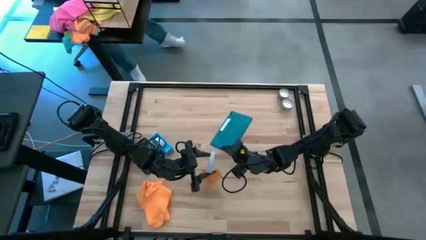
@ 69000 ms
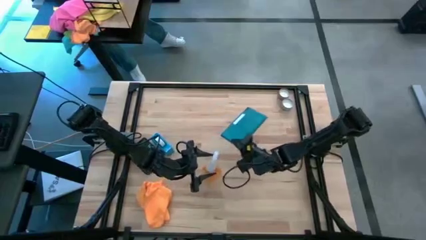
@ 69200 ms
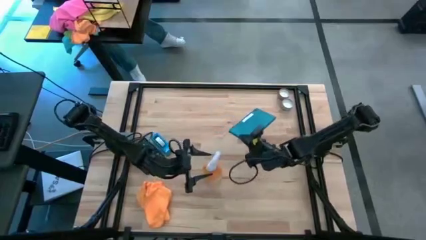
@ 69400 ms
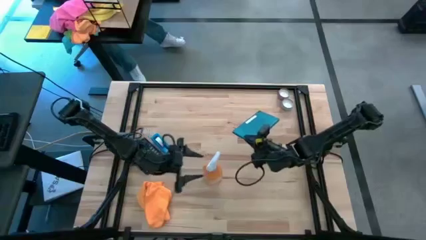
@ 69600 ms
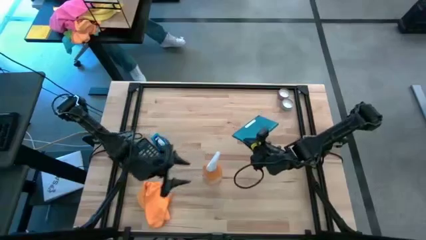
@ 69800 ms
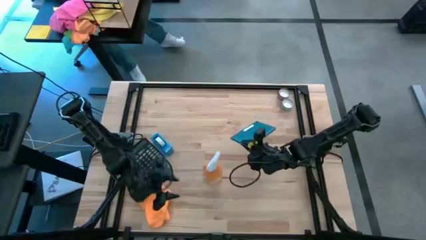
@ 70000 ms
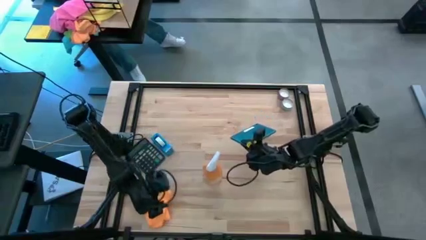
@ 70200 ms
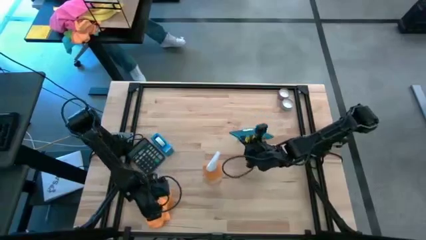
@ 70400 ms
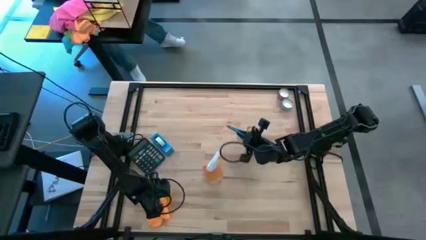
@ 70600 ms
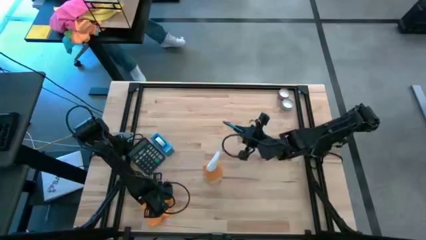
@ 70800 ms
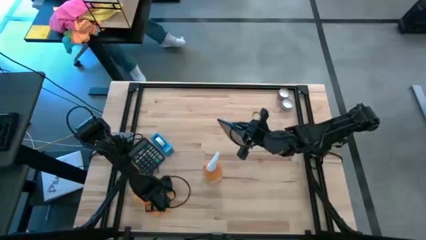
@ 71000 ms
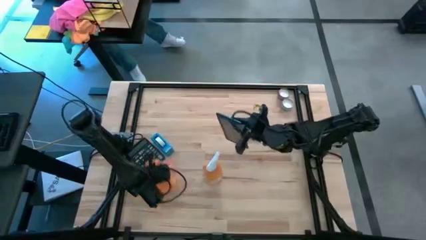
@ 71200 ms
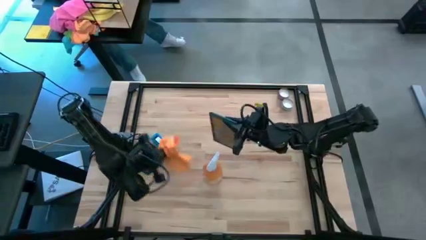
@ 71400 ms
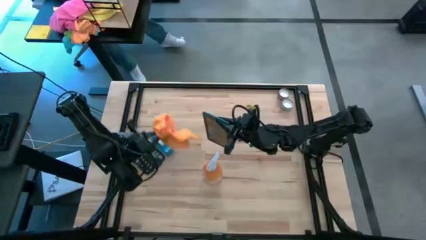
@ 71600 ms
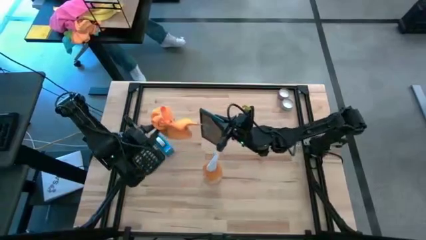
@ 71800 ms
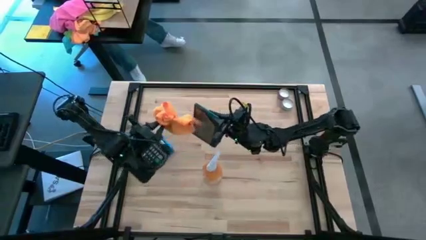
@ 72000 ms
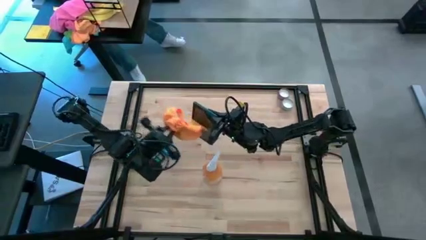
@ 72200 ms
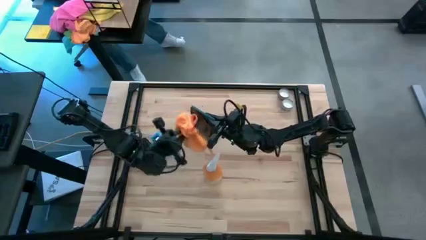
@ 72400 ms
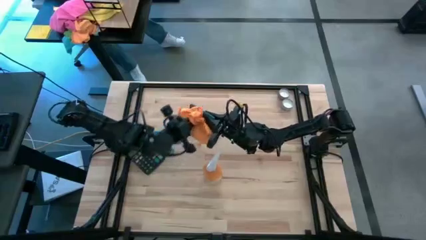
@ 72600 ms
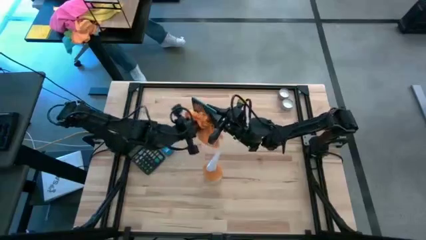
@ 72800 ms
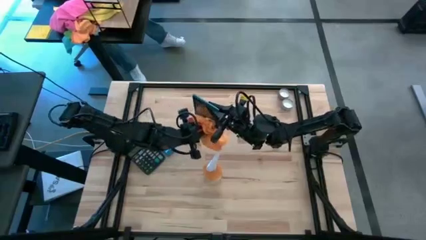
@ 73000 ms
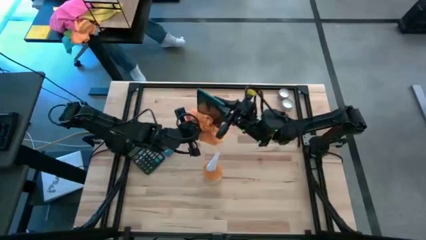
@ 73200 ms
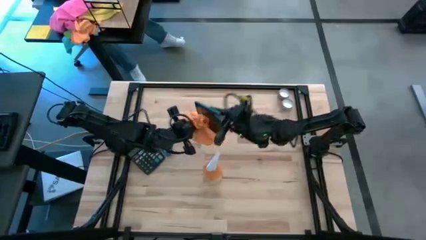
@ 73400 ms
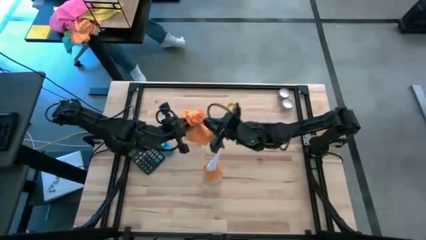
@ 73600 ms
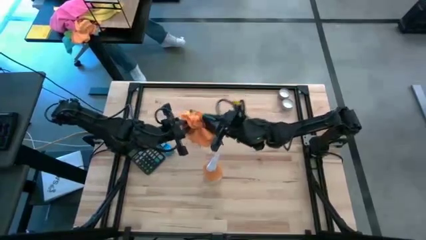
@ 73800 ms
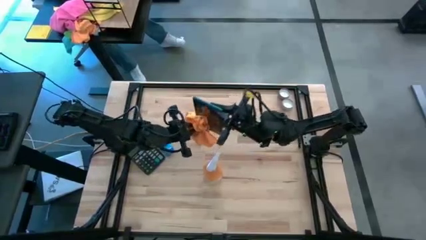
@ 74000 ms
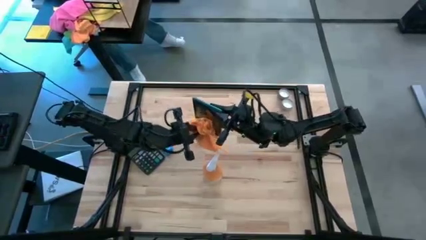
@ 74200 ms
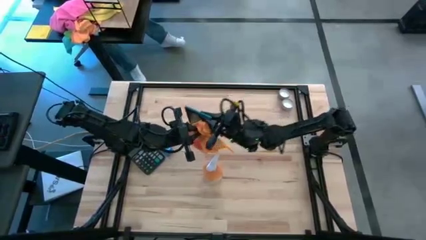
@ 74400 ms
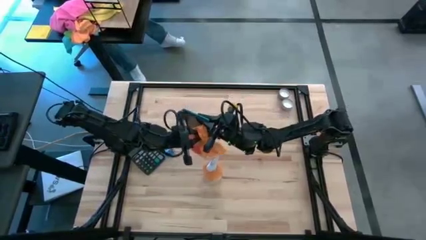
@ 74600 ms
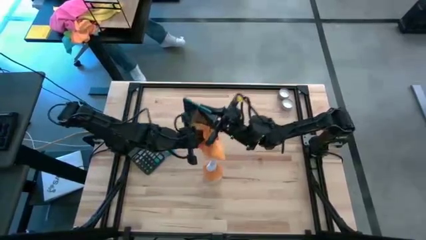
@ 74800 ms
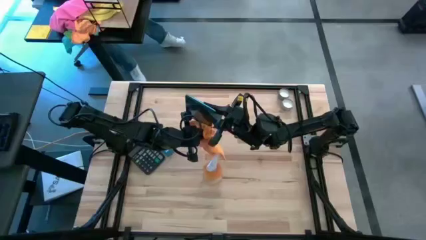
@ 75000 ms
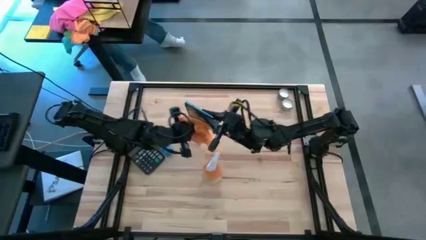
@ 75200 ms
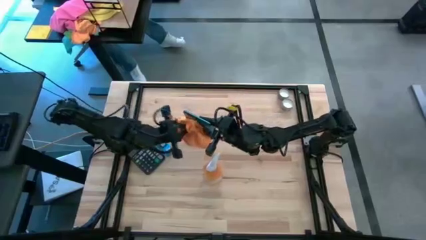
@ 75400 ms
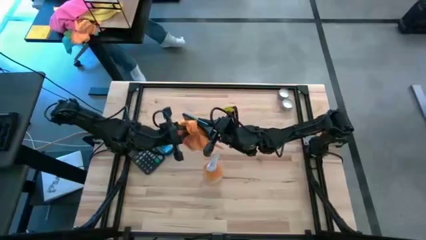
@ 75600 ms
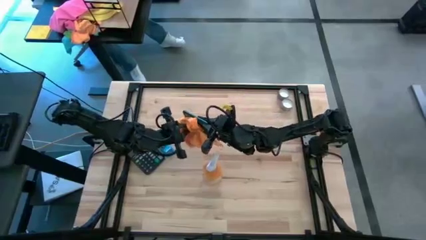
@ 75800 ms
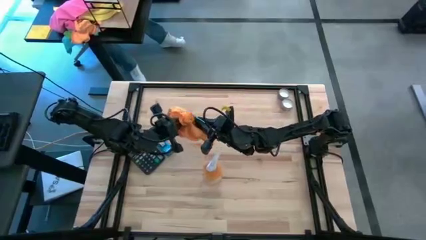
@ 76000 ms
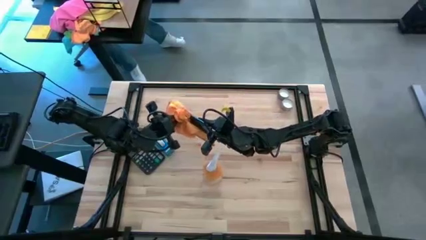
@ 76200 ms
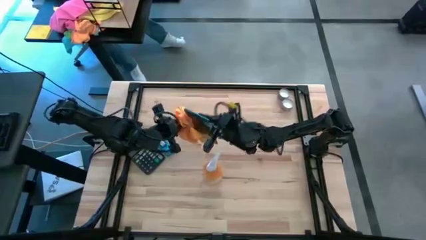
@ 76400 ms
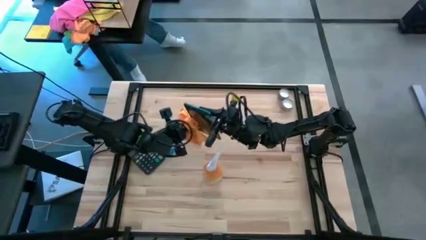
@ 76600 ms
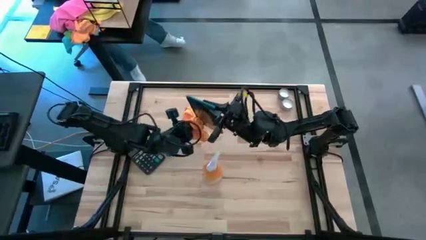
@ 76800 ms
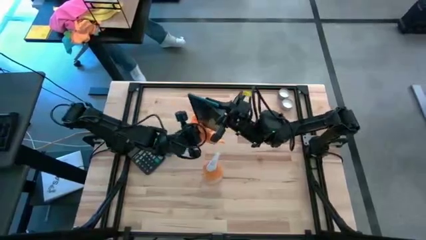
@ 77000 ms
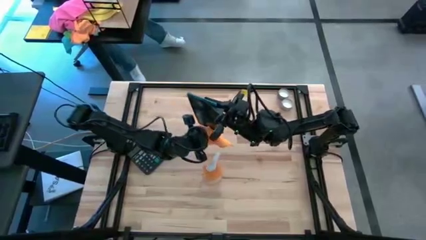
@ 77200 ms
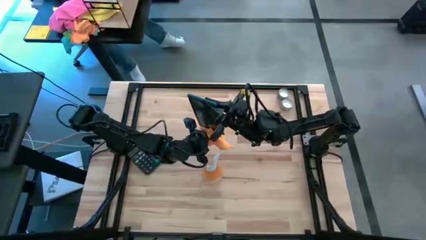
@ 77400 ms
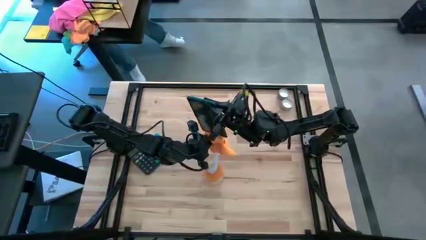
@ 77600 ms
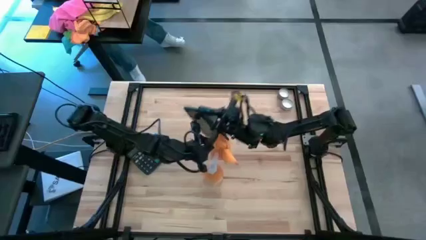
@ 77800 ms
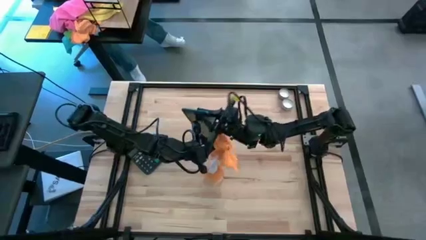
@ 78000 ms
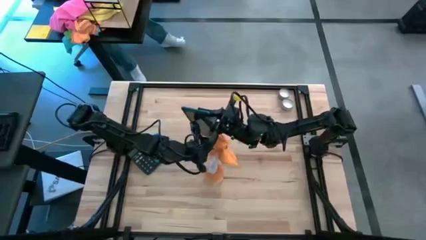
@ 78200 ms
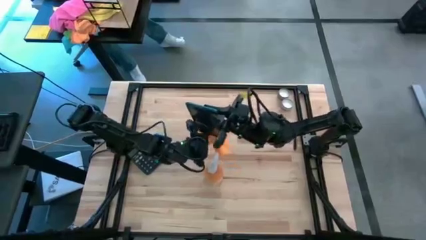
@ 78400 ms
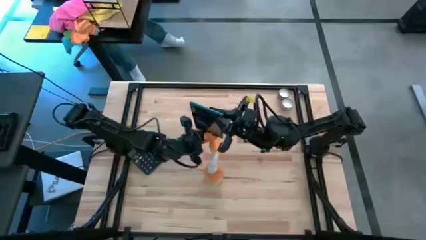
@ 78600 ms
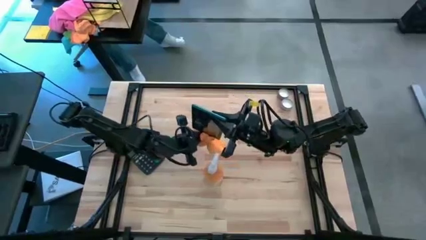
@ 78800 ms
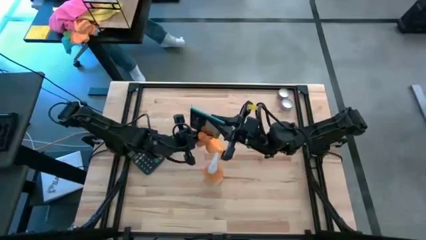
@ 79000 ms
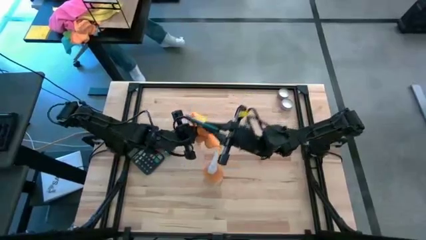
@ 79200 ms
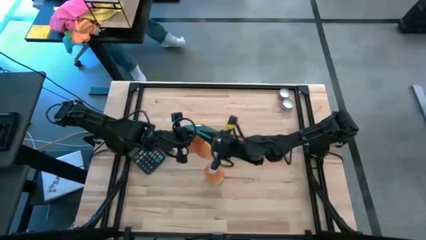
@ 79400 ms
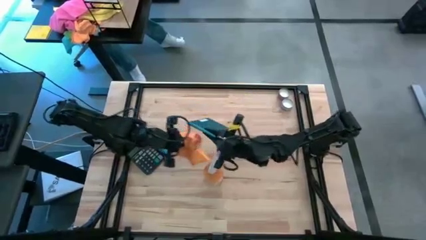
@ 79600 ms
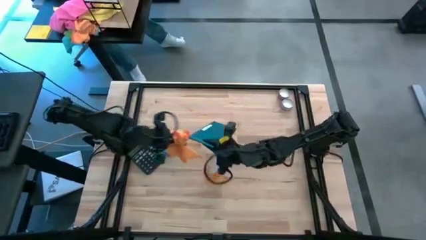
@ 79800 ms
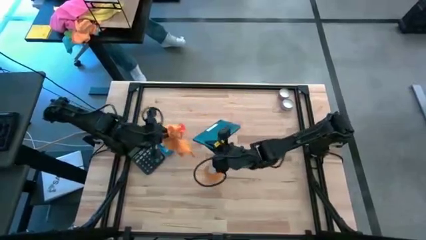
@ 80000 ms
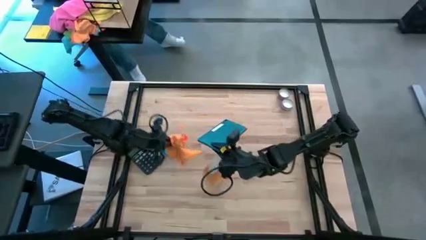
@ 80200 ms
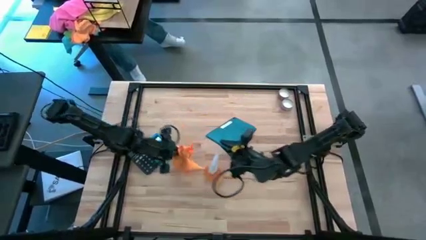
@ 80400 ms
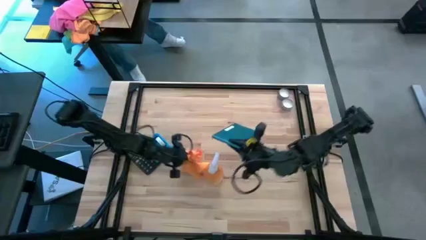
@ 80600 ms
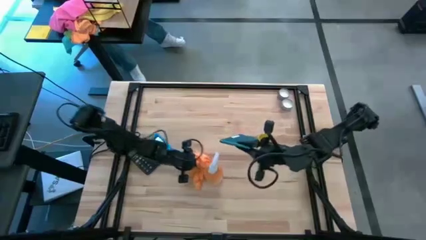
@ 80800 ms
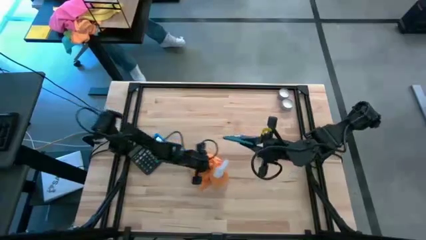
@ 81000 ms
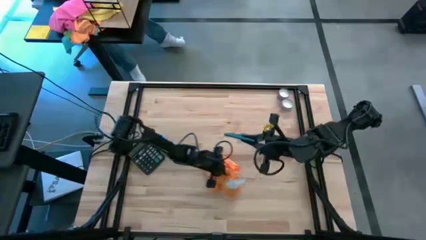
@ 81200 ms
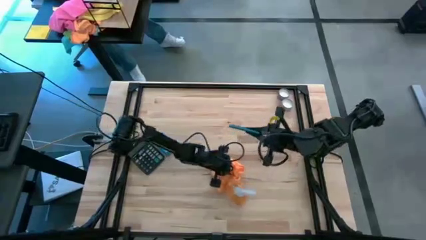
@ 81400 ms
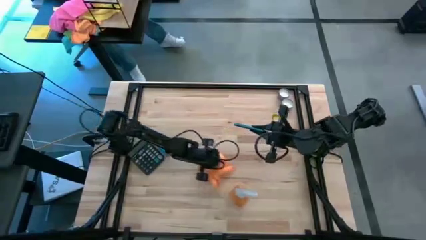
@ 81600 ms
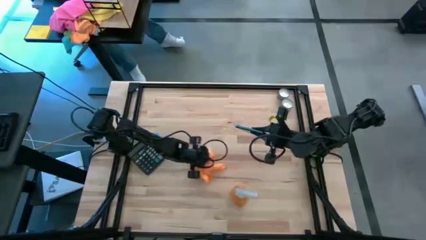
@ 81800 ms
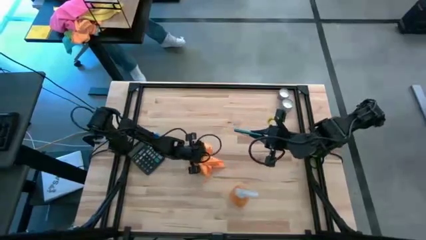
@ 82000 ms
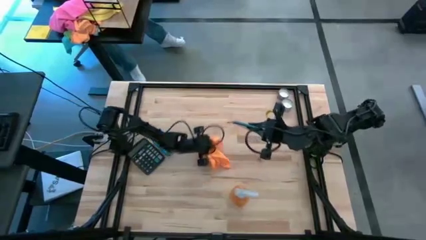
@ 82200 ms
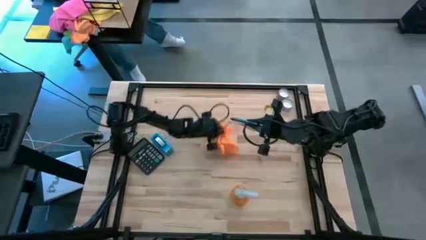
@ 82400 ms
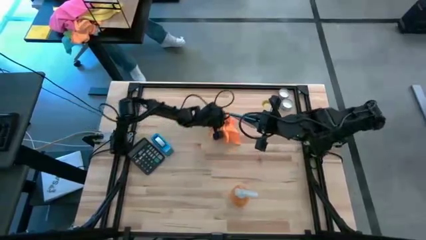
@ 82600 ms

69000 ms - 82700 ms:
Task: Apply microfiber cloth
Wipe the blue phone with the orange microfiber cloth
